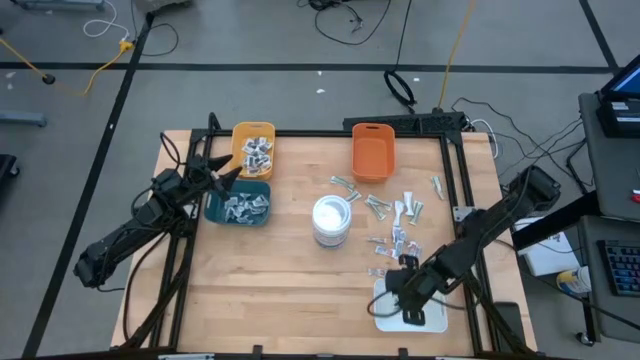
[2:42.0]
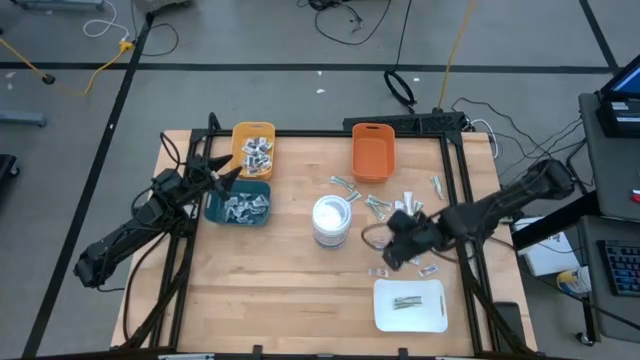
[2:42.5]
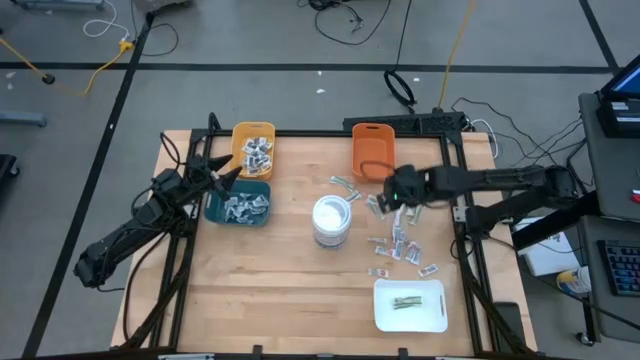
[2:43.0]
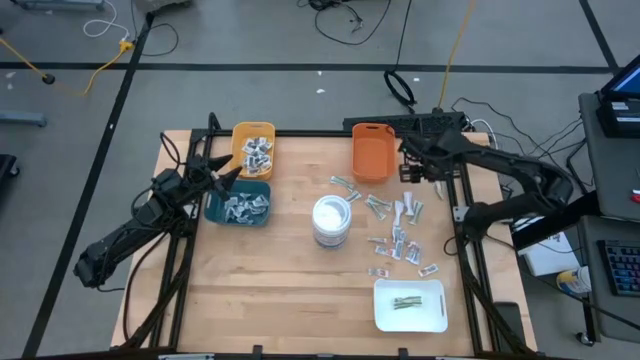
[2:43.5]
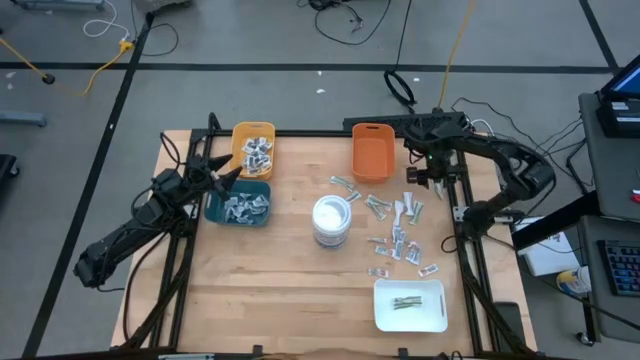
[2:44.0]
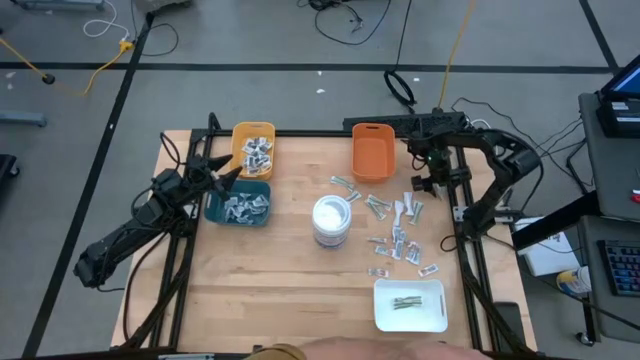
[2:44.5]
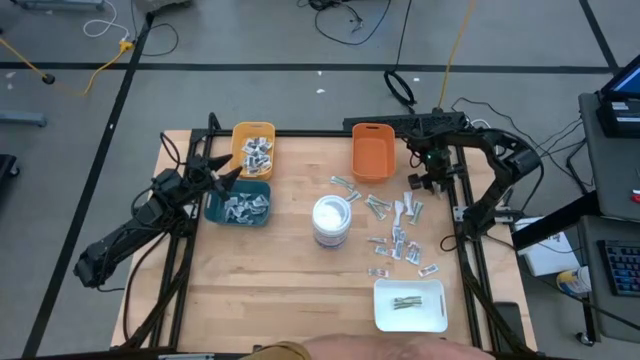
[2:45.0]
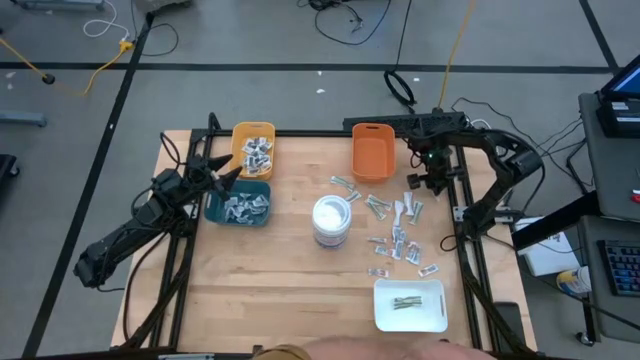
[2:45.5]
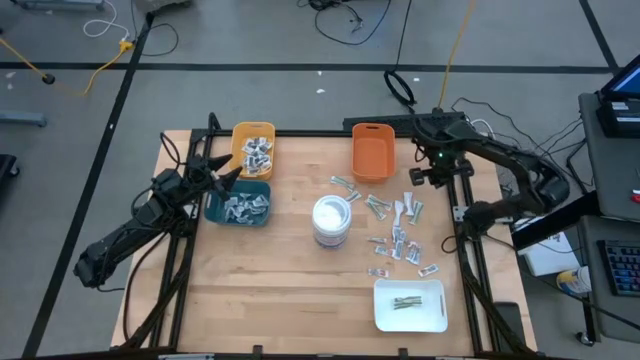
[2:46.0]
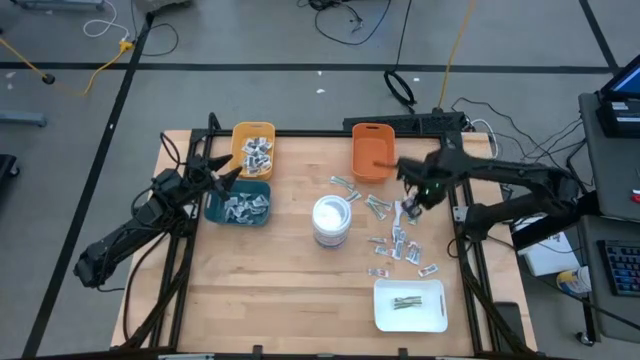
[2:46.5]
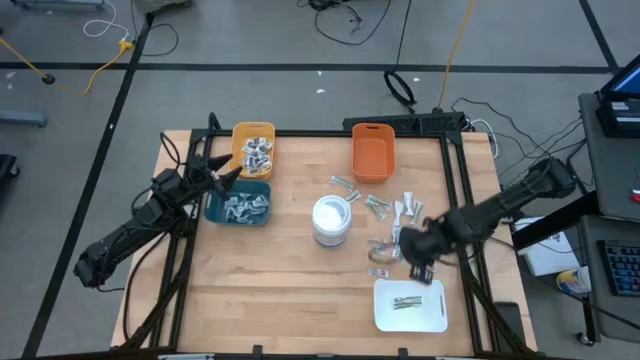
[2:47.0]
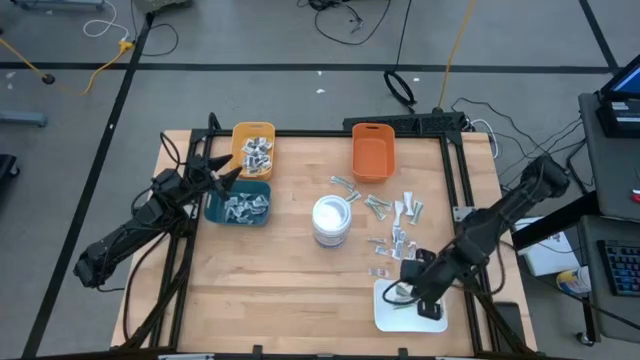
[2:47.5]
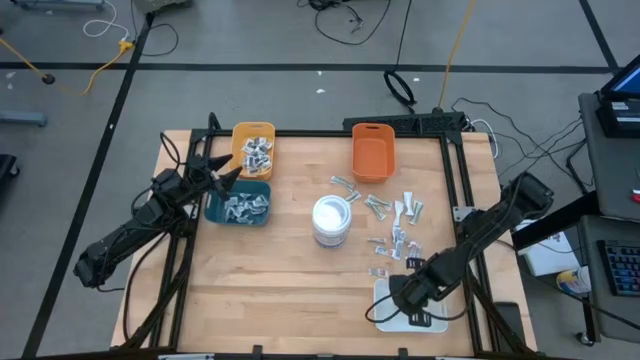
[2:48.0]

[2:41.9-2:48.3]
Task: Pick & Place First Aid Supplies
Put the green bandage into the white bin

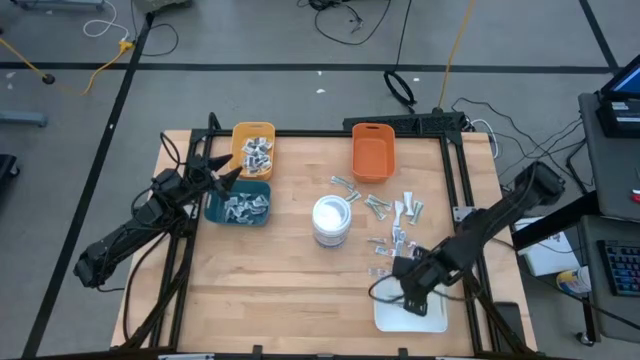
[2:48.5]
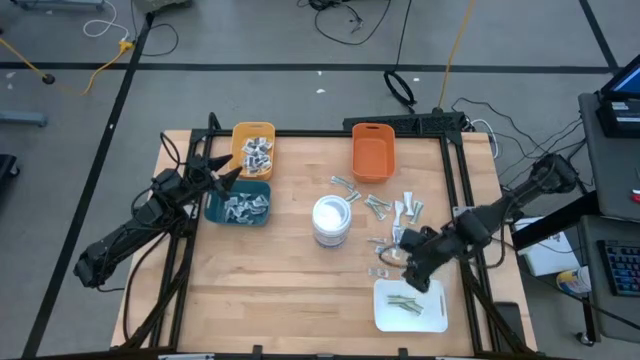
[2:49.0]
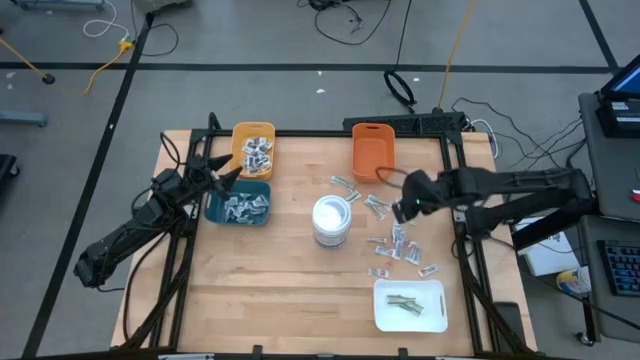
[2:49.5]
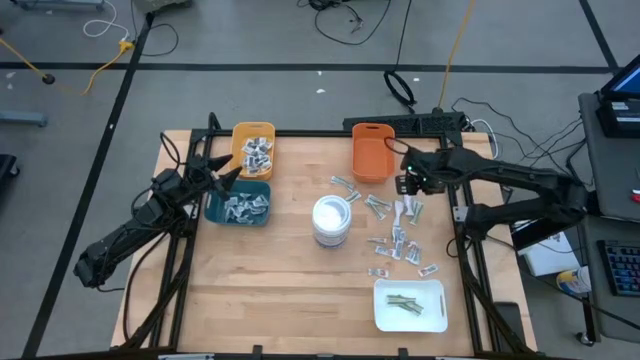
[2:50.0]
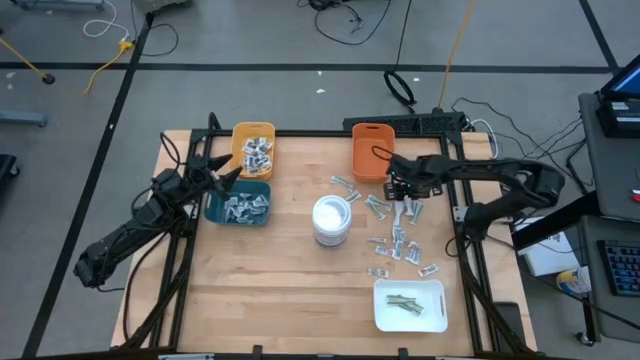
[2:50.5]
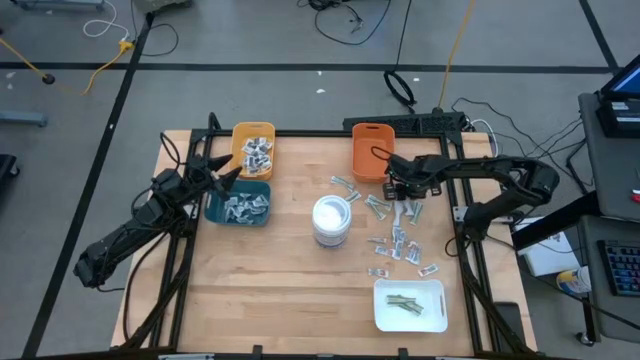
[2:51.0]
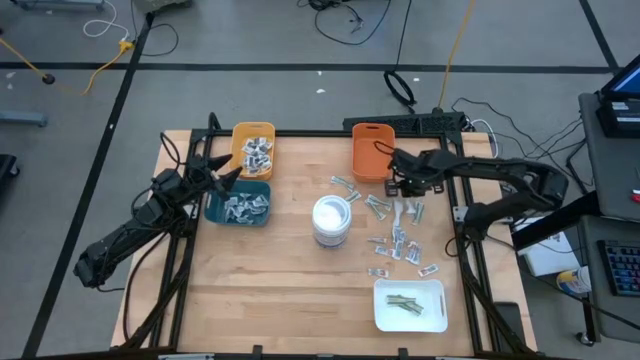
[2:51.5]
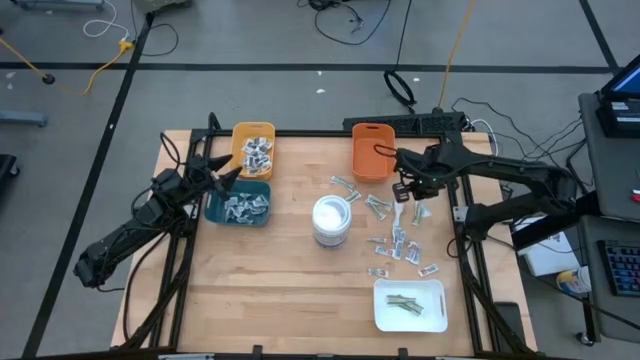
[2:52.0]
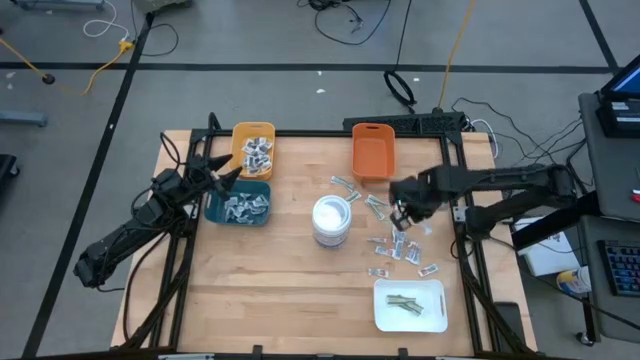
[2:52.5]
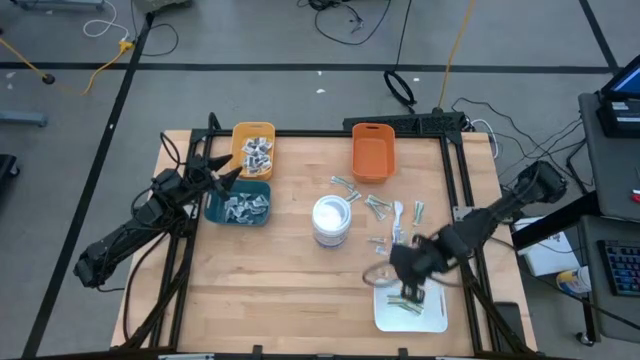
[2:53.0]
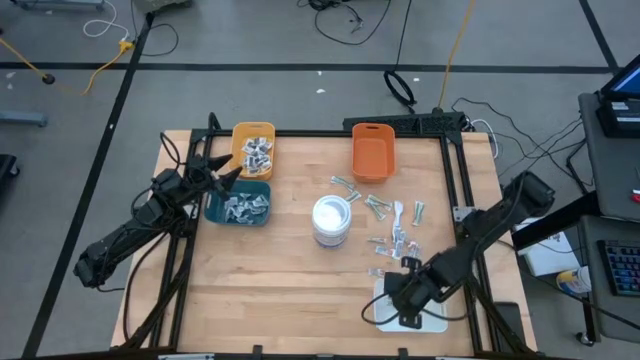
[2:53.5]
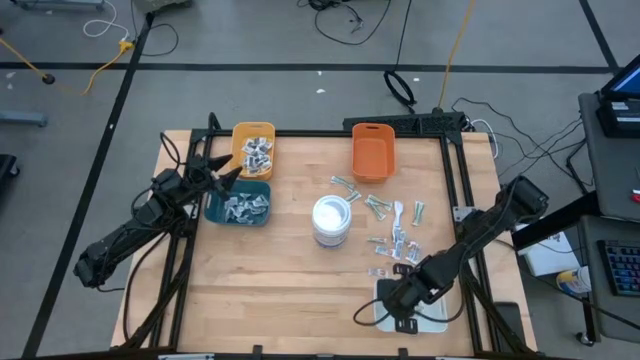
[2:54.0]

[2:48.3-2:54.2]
Put the green bandage into the white bin

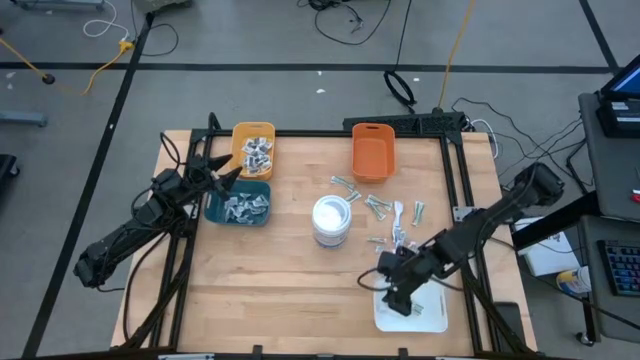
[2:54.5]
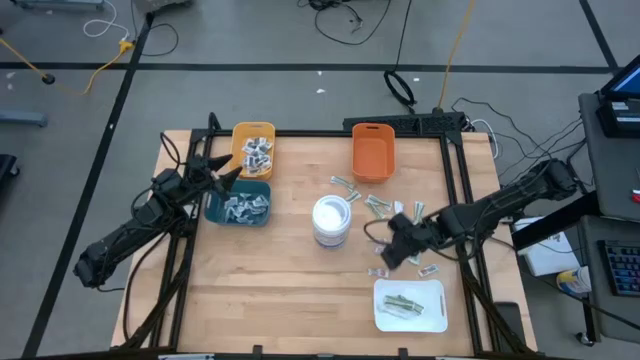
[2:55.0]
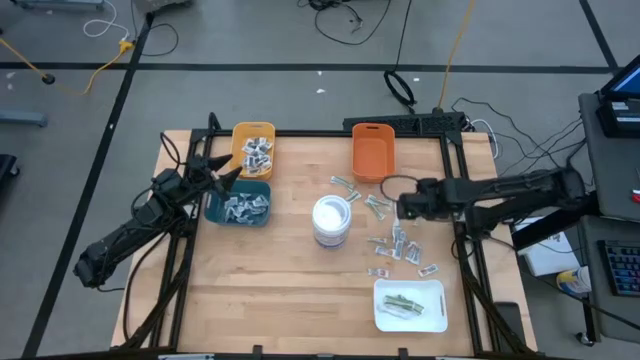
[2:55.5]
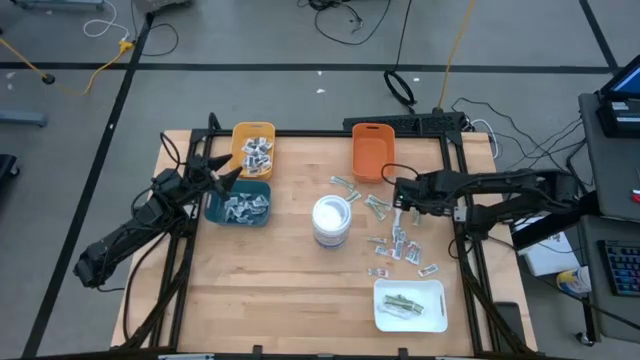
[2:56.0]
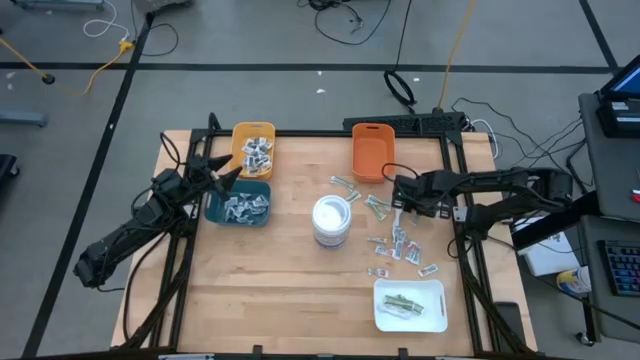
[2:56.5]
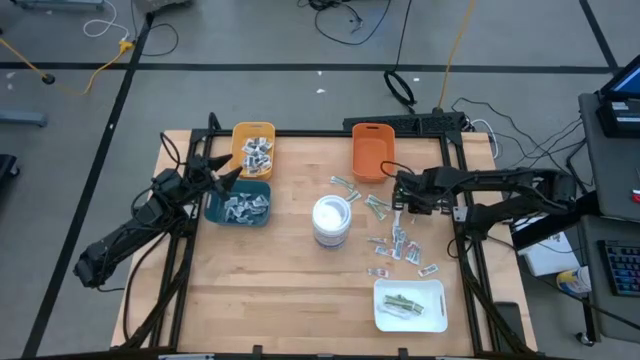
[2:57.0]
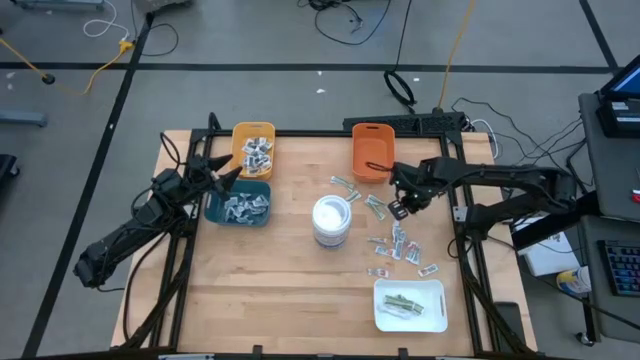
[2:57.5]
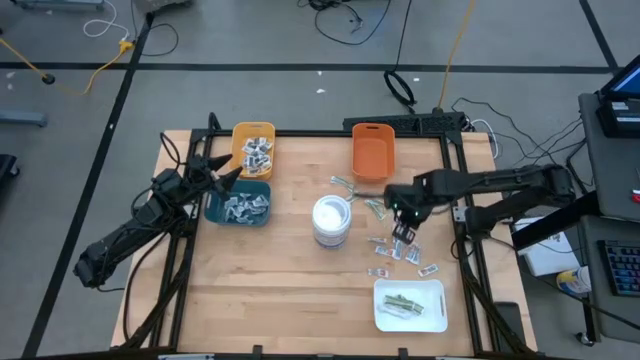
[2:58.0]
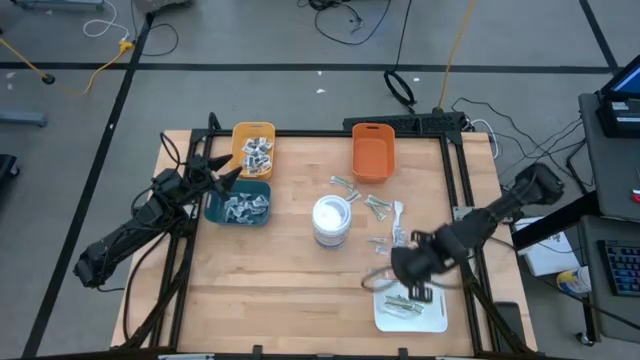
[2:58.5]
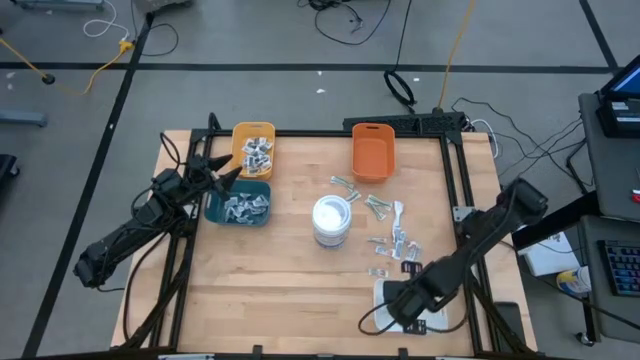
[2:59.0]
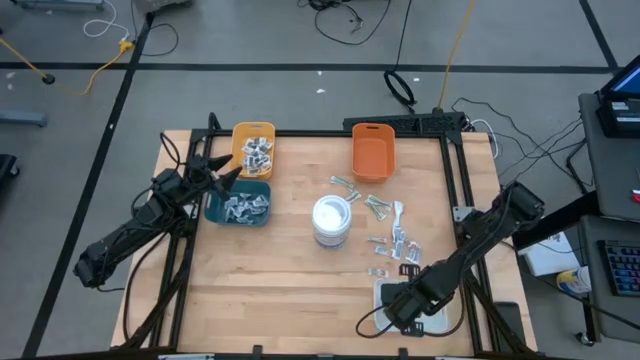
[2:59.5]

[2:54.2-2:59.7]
Put the green bandage into the white bin

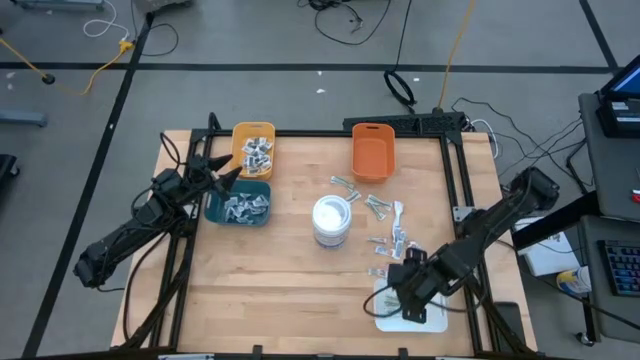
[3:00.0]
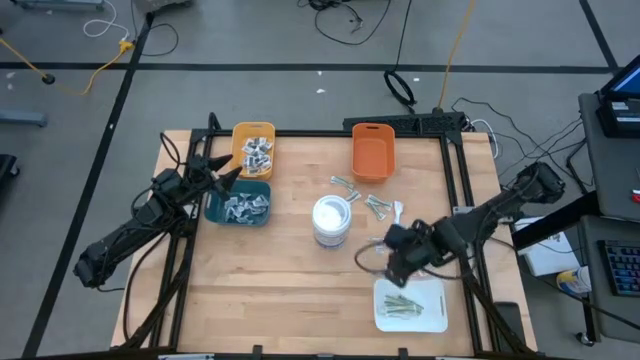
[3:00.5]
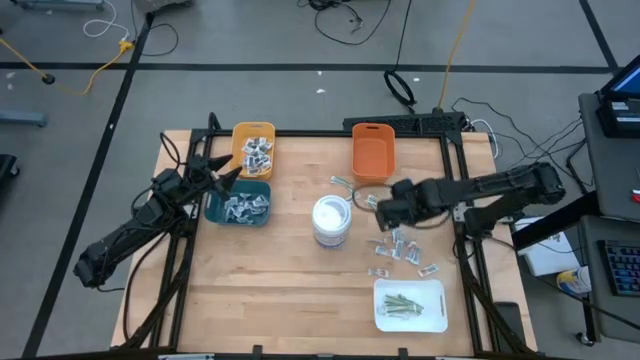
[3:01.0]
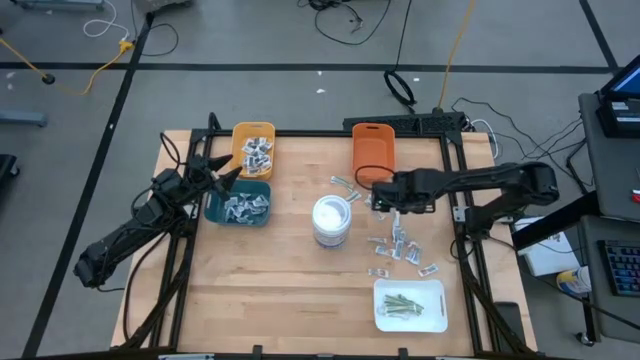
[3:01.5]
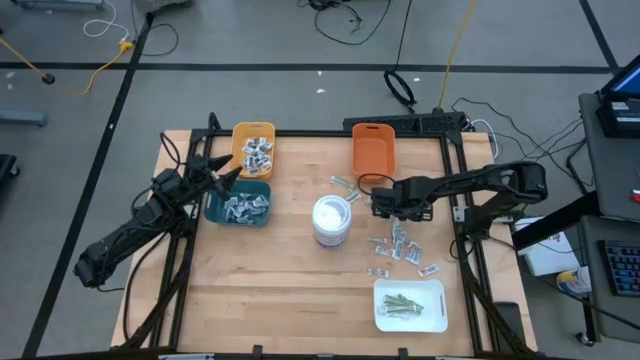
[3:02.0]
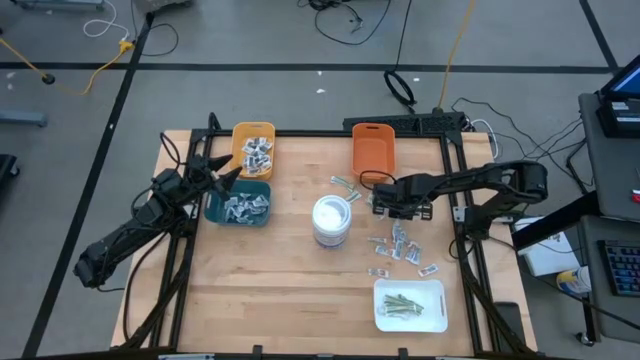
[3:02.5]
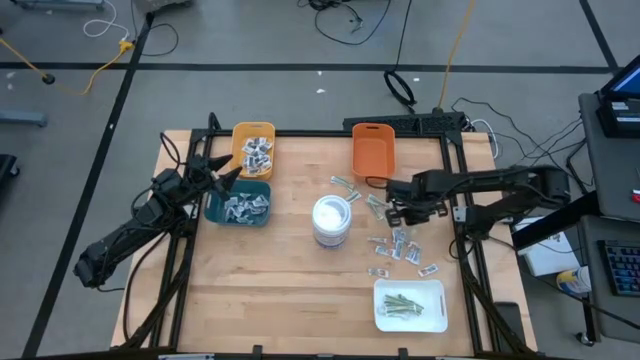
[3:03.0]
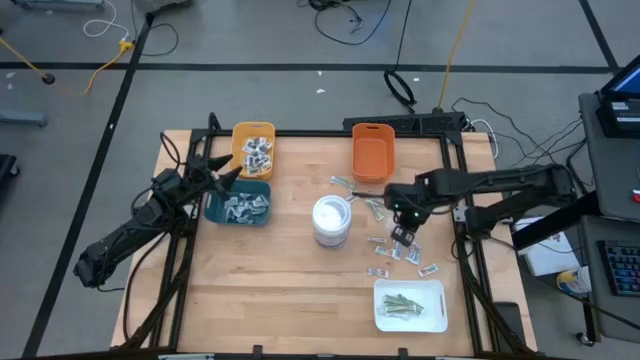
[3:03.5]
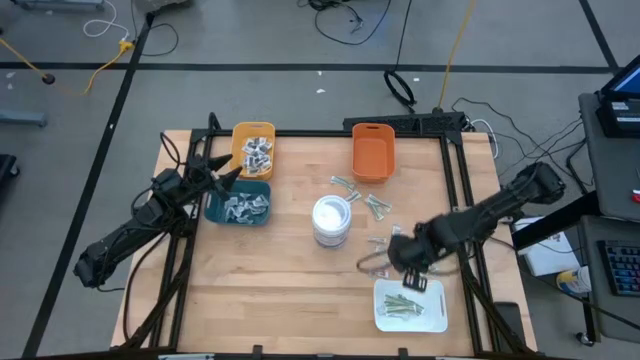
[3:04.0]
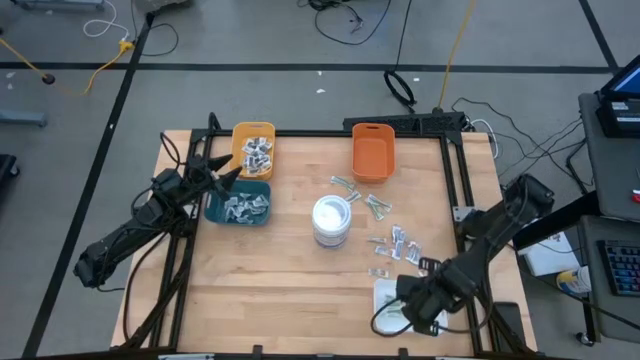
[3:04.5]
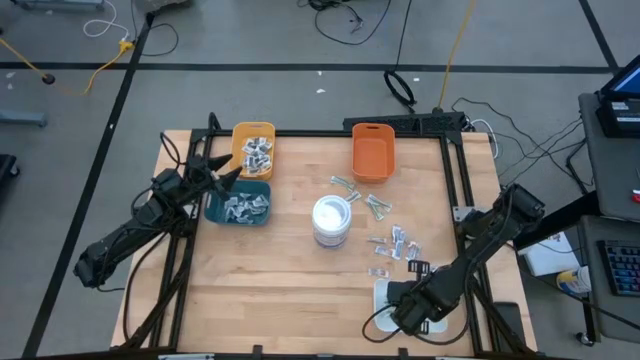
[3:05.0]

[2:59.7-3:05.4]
Put the green bandage into the white bin
